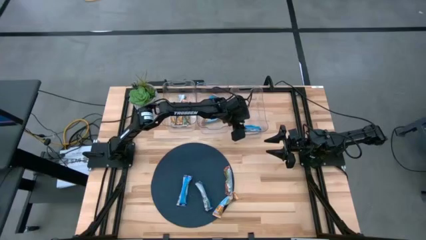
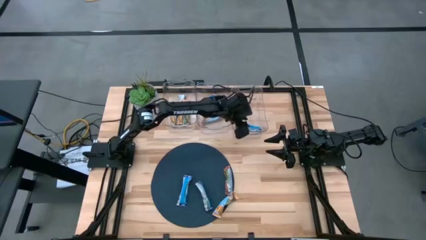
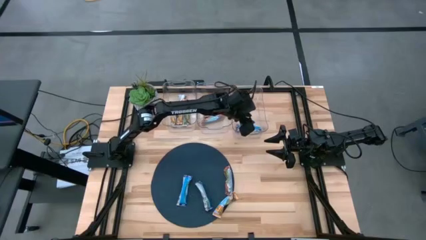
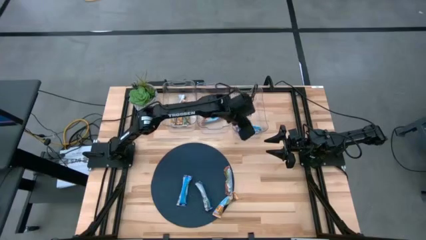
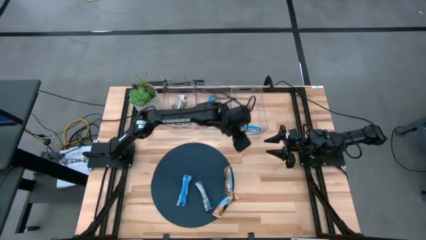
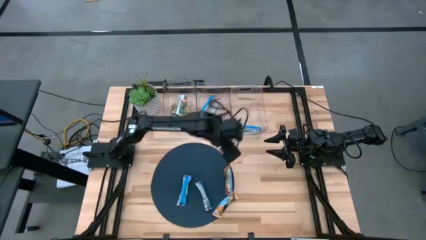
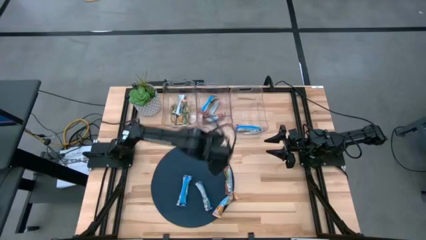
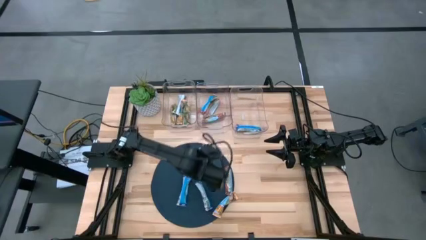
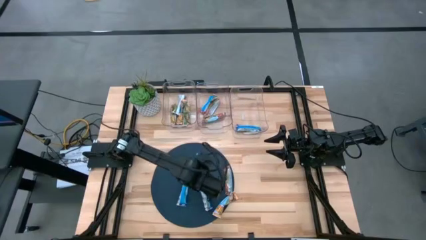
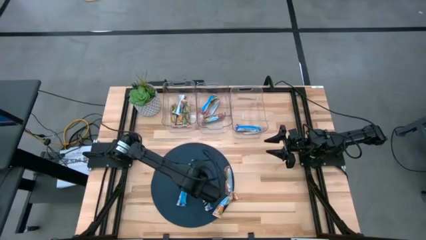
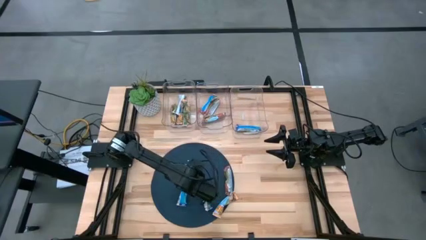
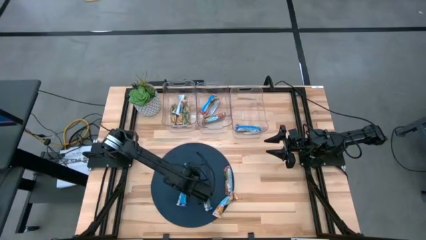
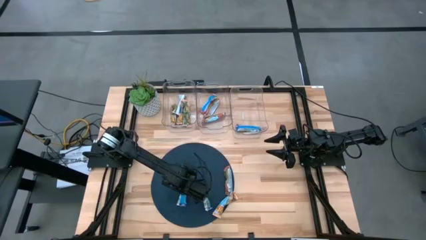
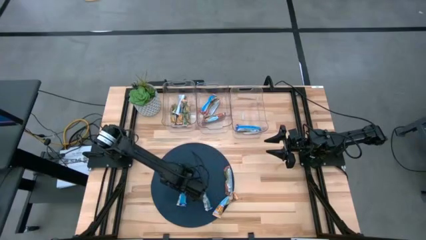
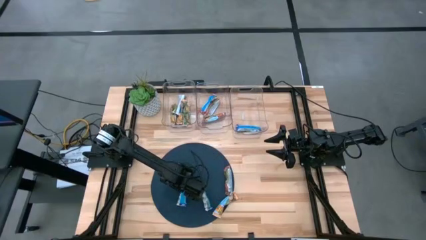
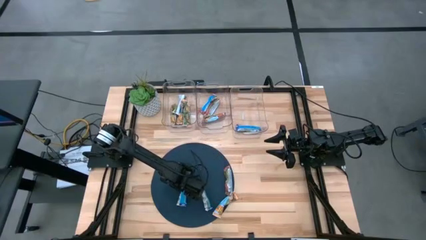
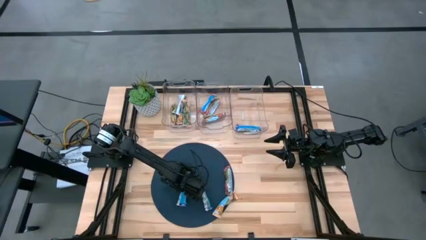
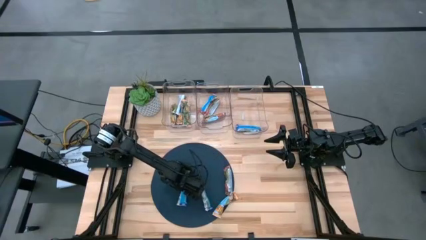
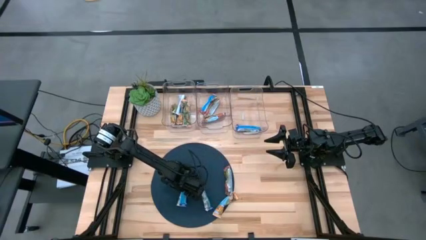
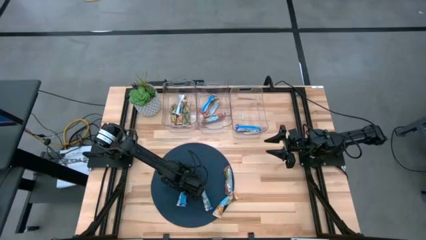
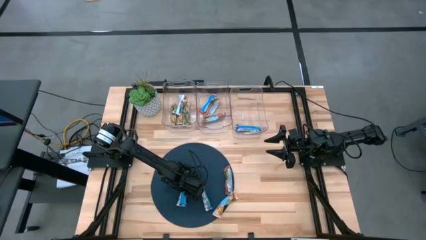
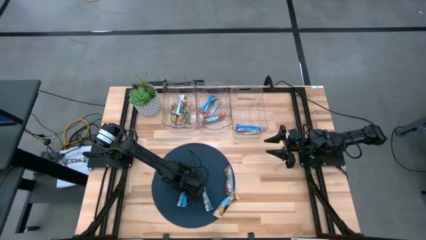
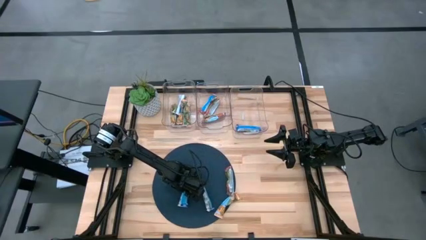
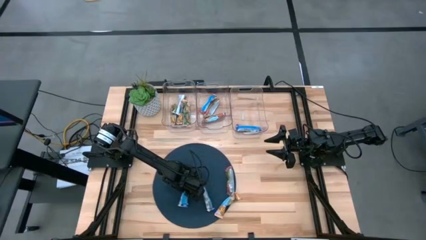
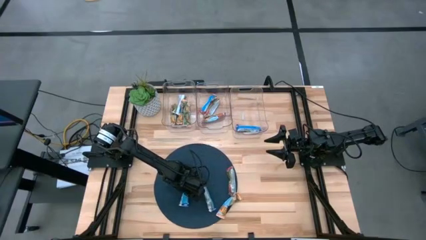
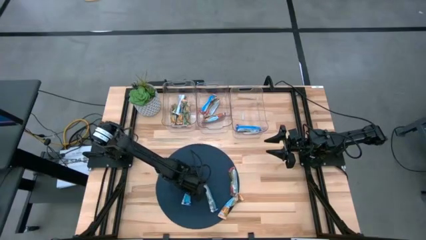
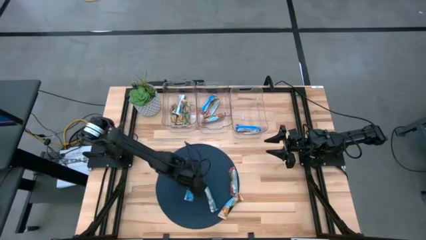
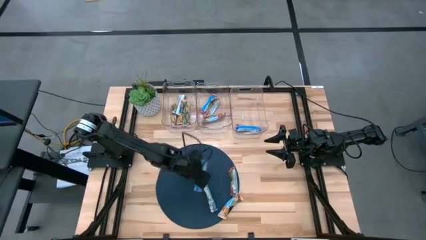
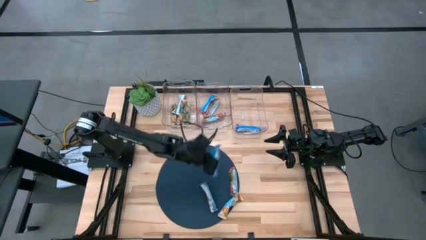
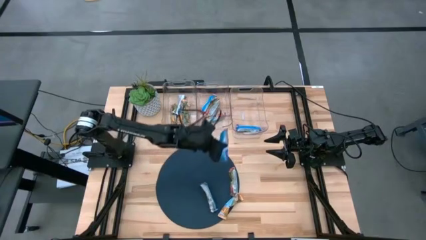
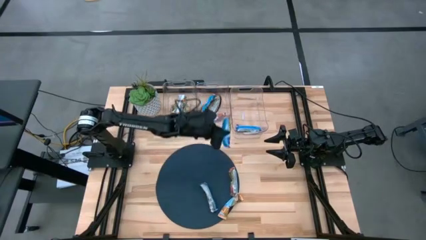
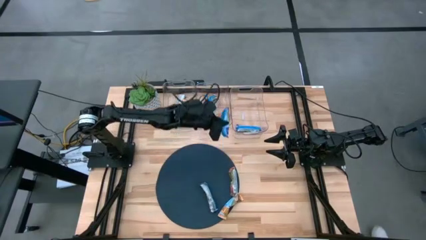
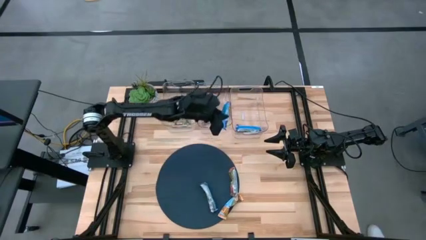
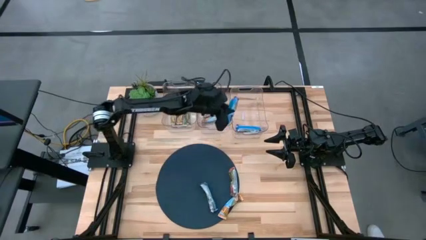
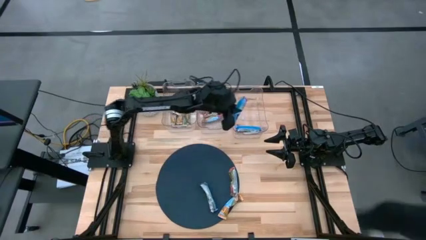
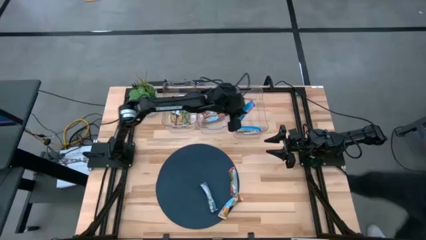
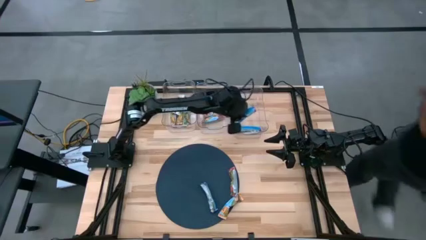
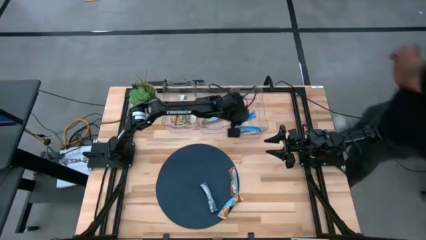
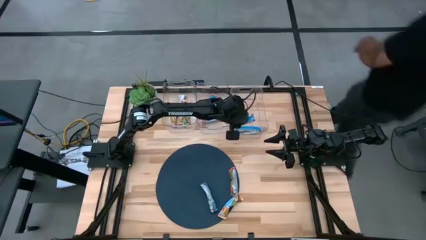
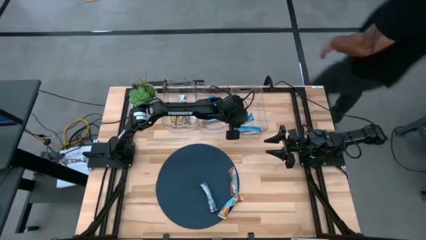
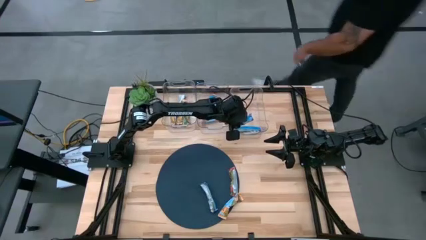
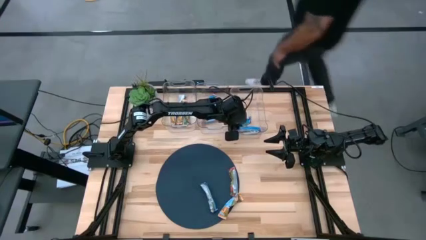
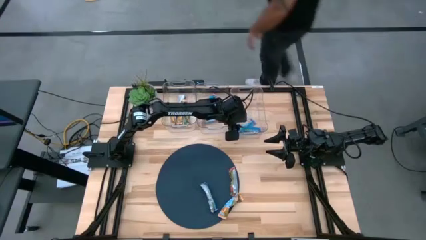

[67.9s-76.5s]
Task: Pick and place Granola Bars by type
Put the blue granola bar into the right transparent bin

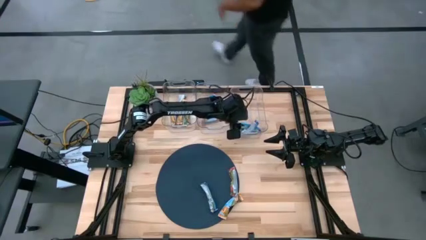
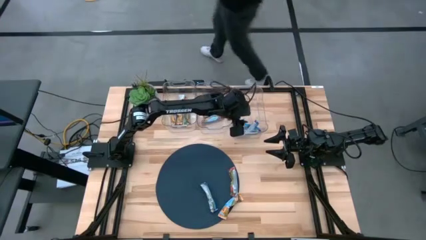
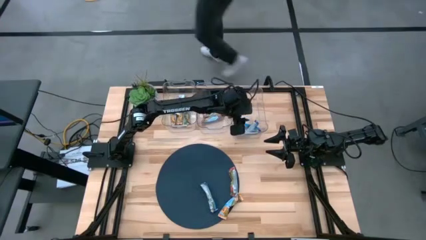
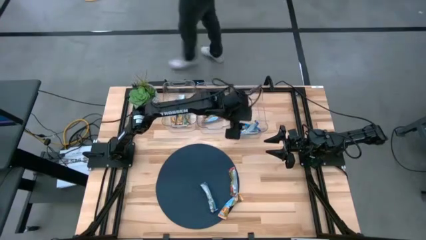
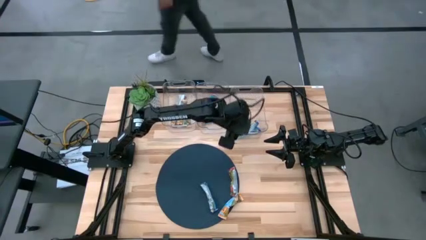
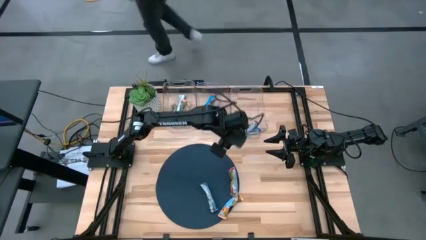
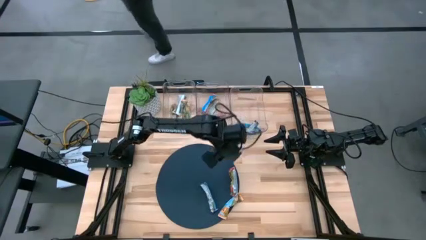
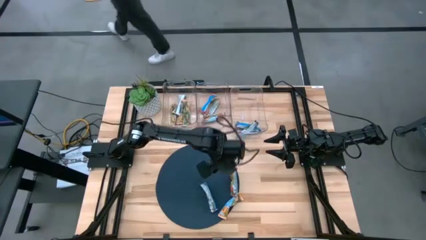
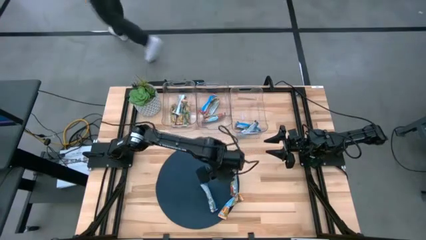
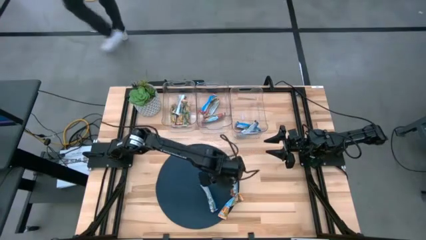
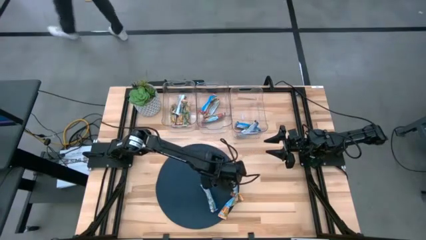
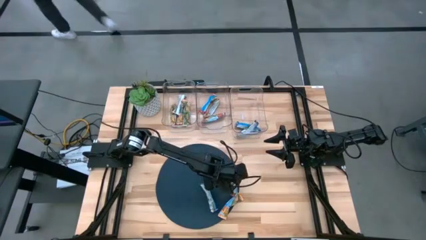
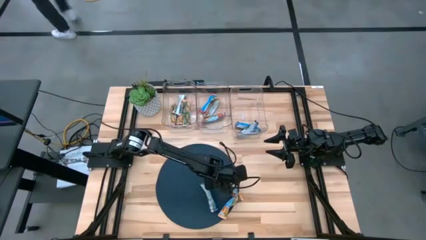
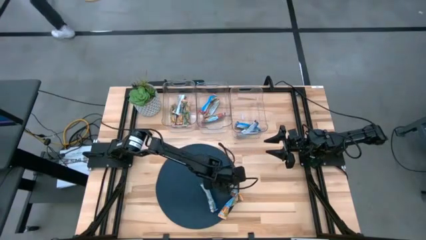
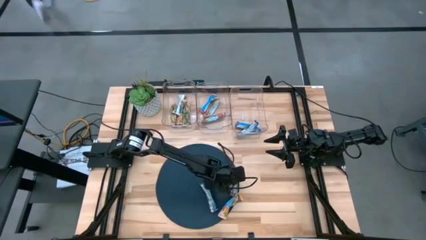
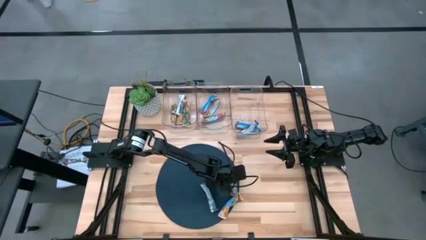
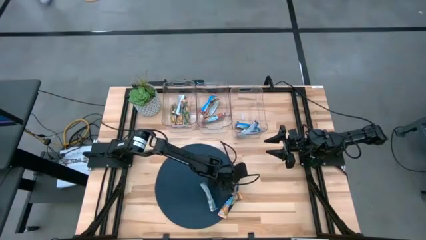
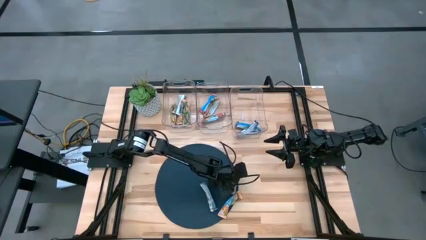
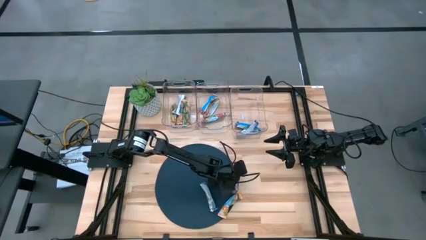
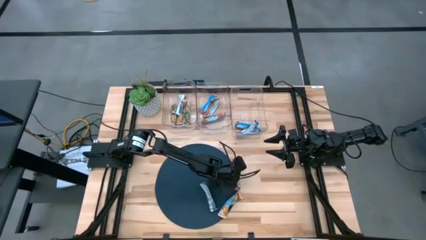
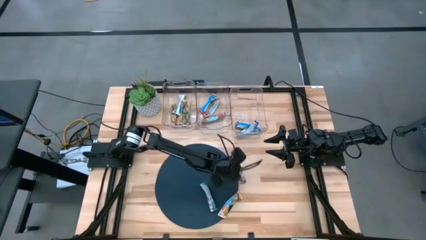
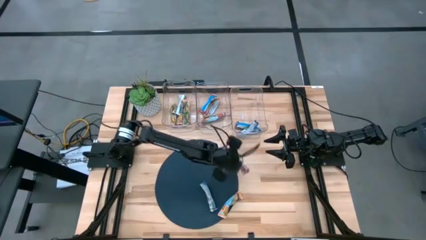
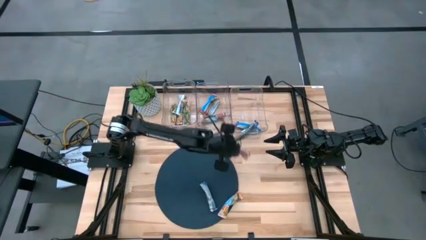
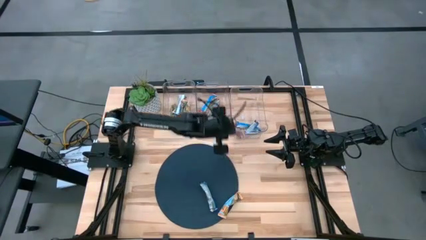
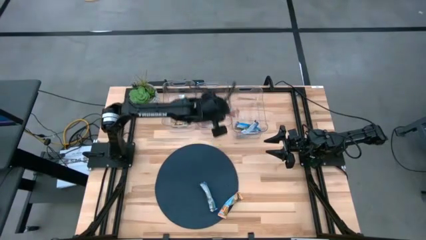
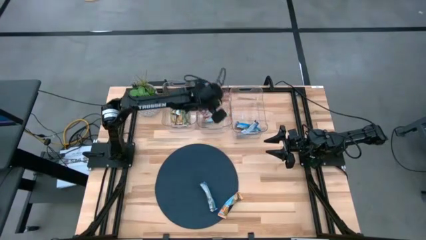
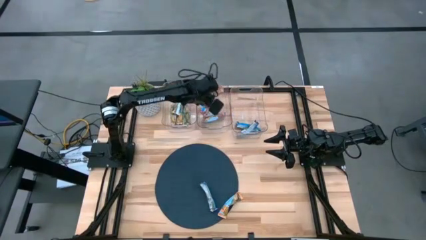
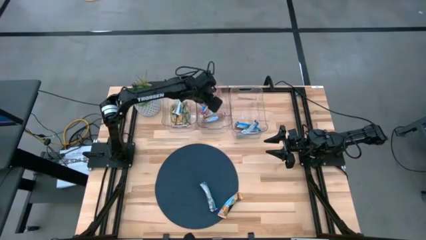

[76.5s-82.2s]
Put the red granola bar into the center transparent bin
